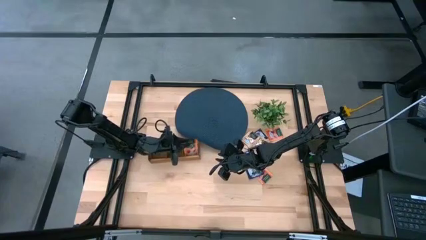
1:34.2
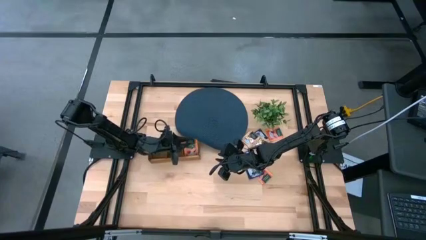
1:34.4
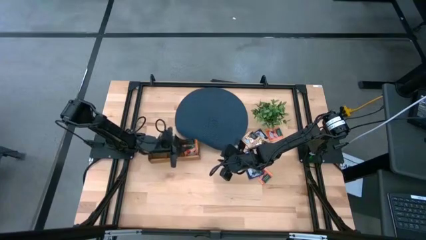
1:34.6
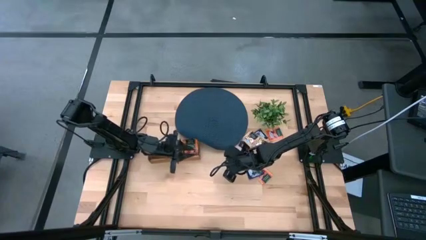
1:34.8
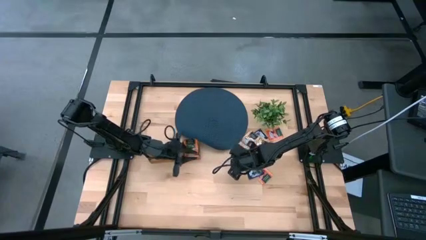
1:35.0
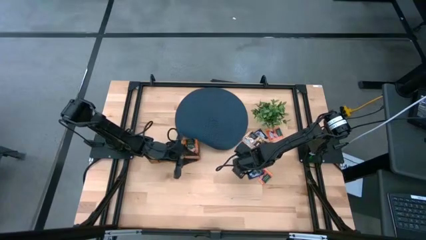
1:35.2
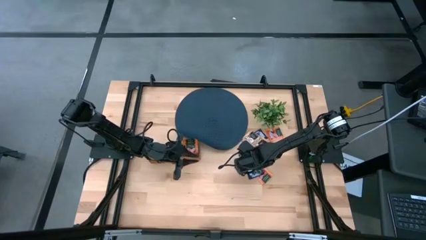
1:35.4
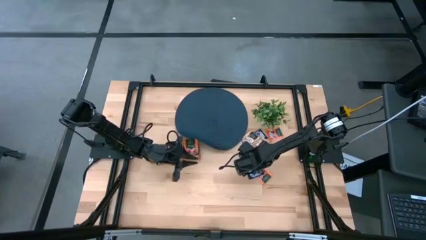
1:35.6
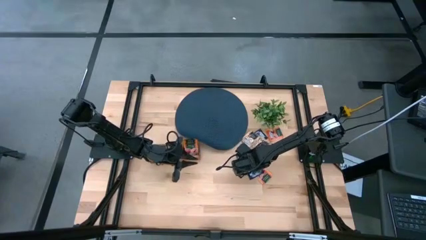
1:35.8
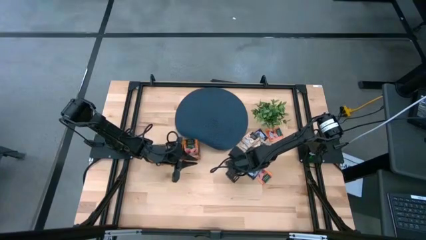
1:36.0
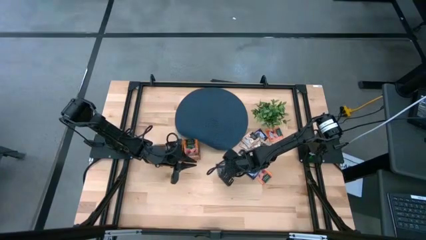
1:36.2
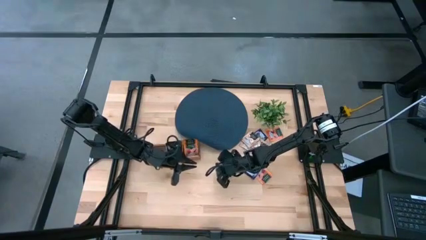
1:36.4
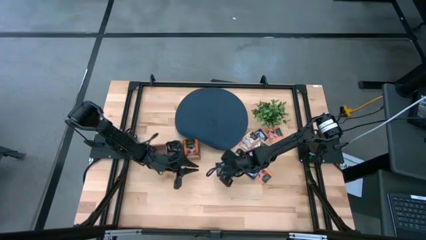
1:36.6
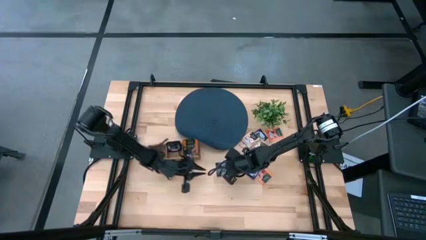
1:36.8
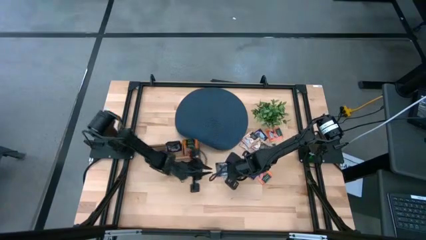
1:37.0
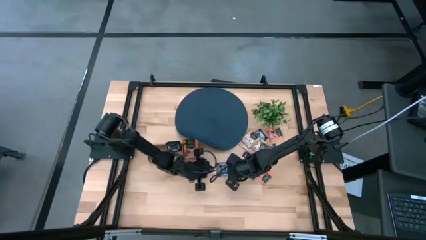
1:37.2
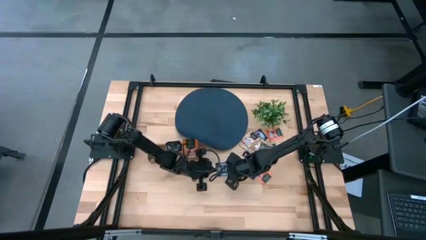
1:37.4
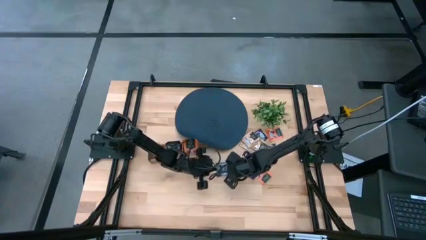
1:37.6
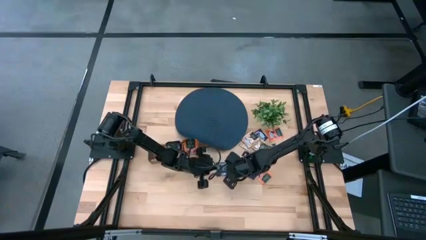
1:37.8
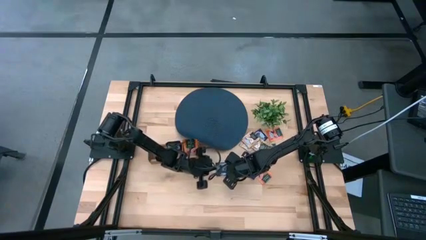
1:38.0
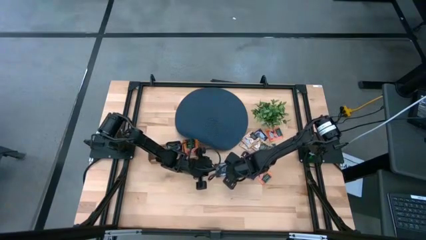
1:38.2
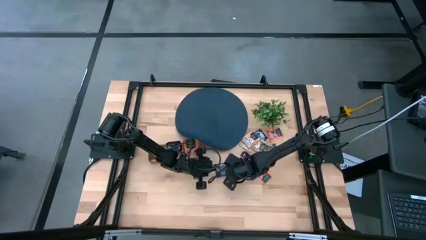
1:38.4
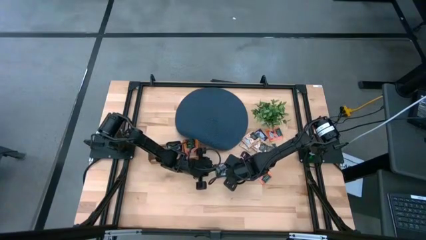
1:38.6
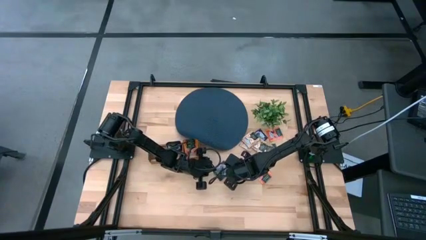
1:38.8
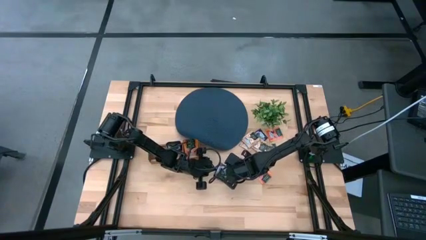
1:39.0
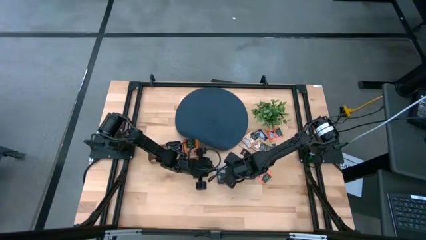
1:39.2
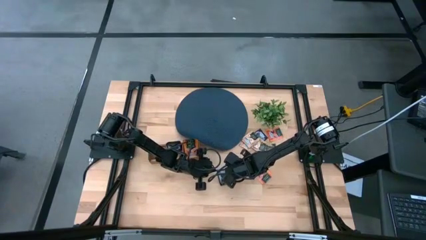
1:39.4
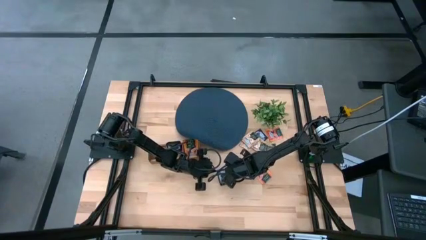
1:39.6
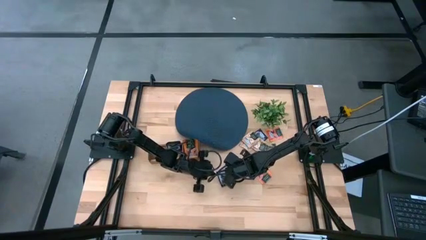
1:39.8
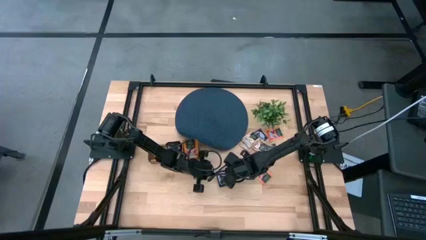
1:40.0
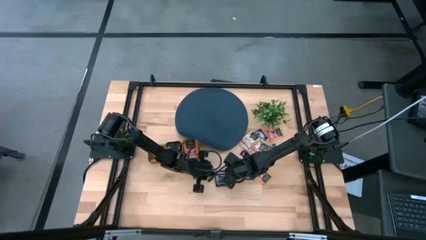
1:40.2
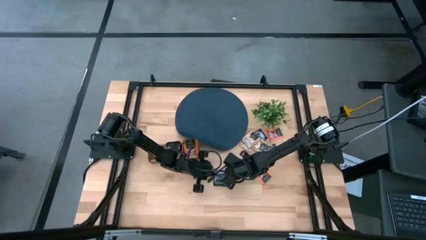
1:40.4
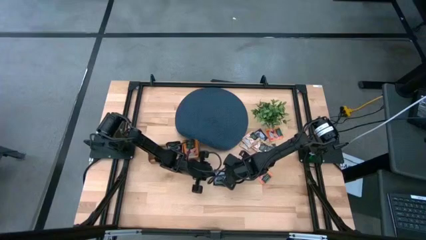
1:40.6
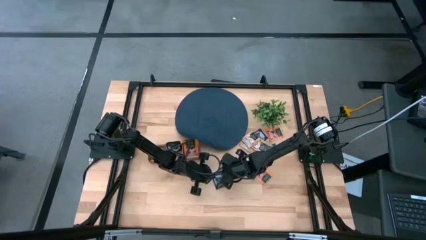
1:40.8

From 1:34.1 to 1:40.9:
Task: Pick & Place Tea
Put the blue tea bag into the middle section of the wooden organizer

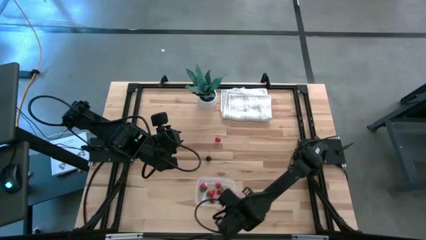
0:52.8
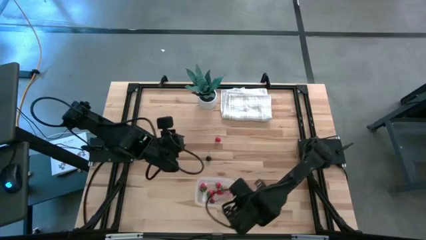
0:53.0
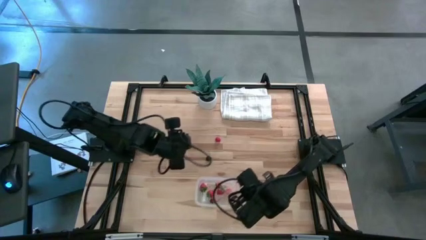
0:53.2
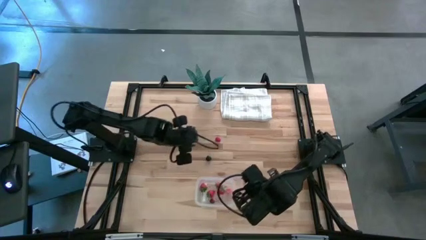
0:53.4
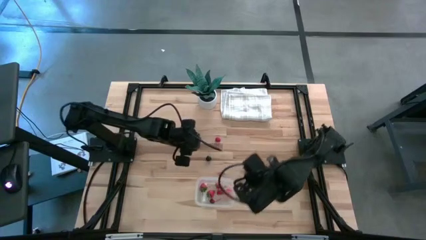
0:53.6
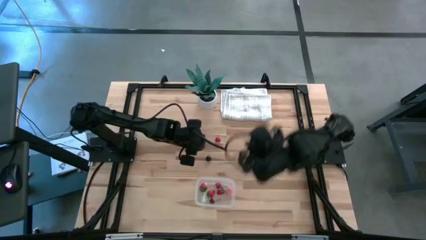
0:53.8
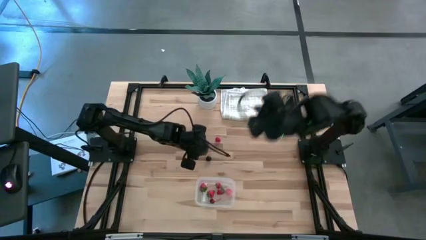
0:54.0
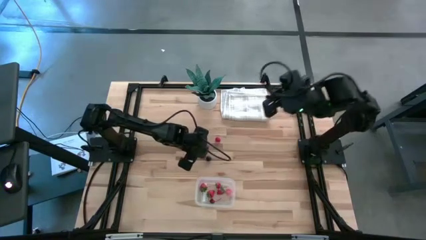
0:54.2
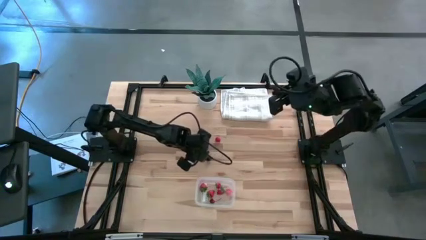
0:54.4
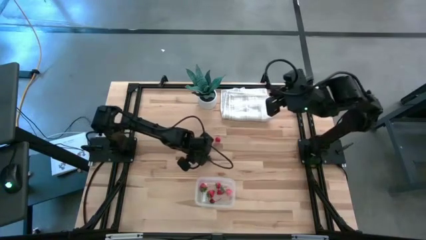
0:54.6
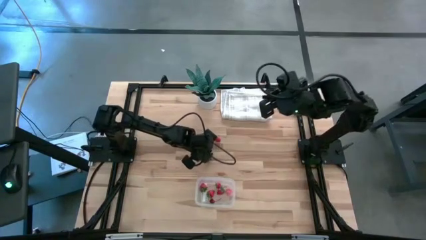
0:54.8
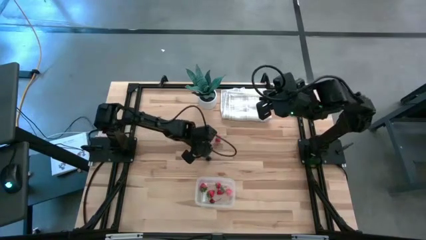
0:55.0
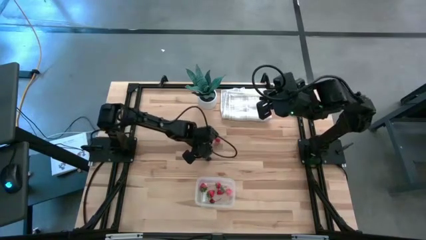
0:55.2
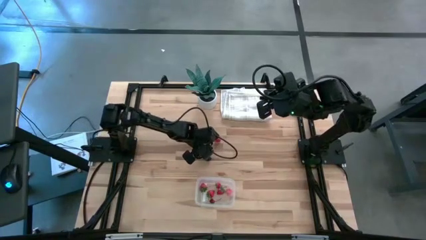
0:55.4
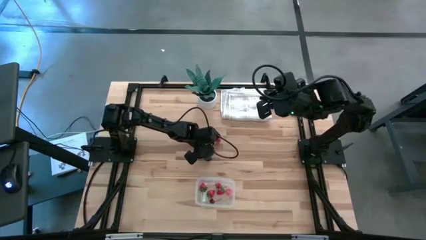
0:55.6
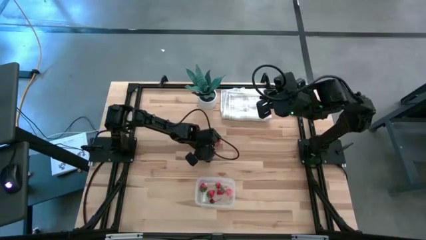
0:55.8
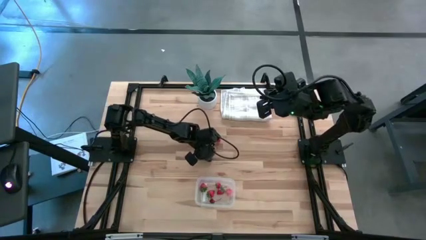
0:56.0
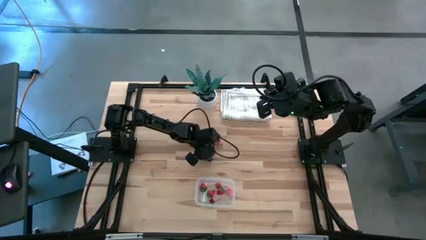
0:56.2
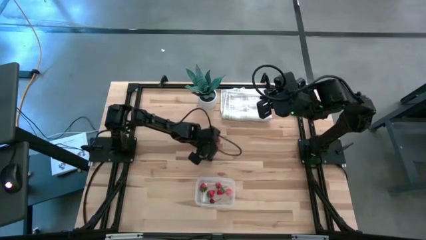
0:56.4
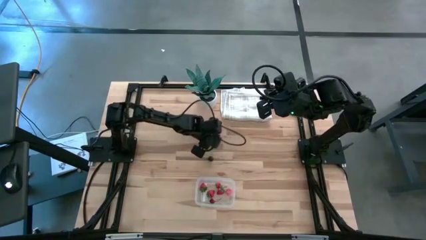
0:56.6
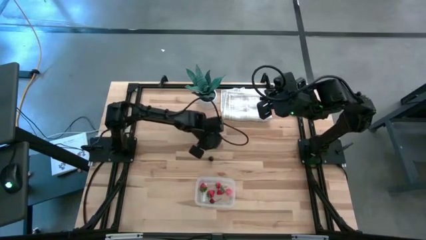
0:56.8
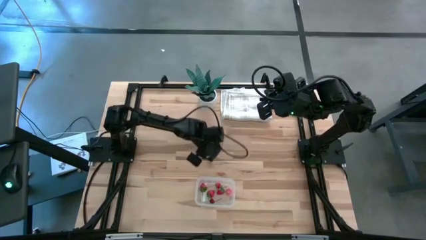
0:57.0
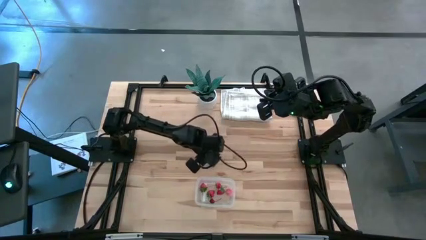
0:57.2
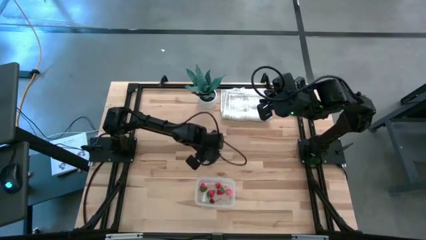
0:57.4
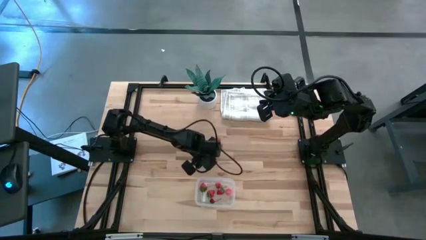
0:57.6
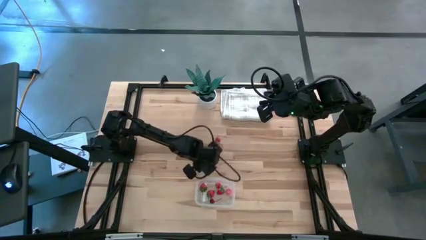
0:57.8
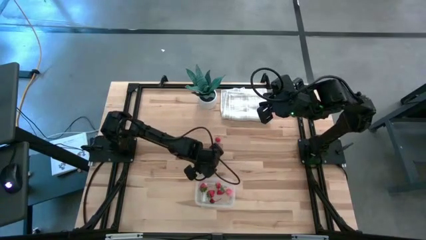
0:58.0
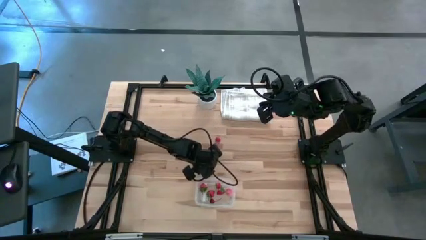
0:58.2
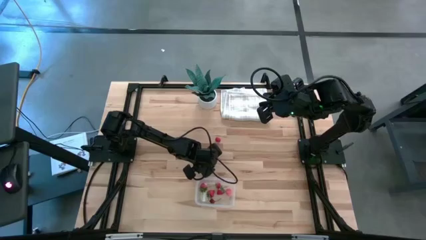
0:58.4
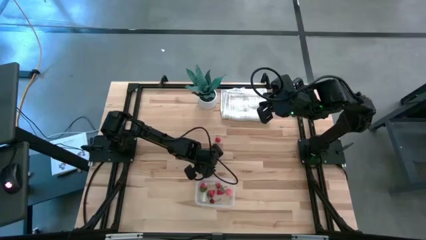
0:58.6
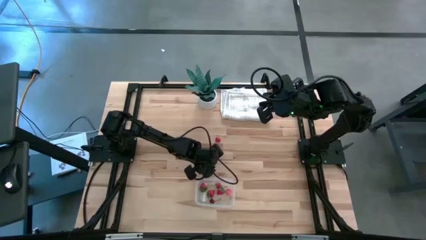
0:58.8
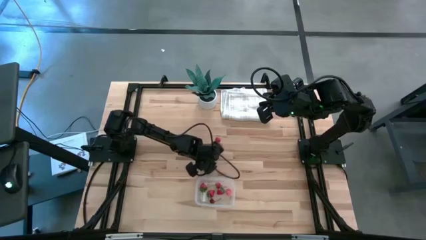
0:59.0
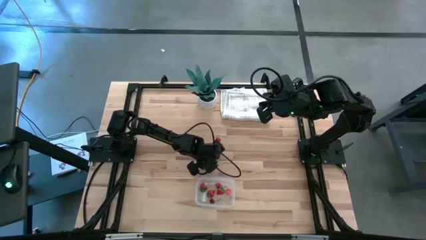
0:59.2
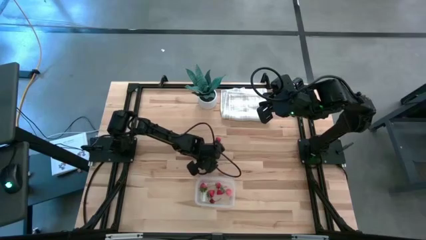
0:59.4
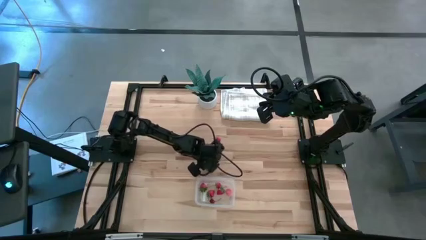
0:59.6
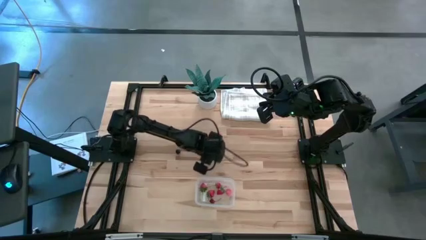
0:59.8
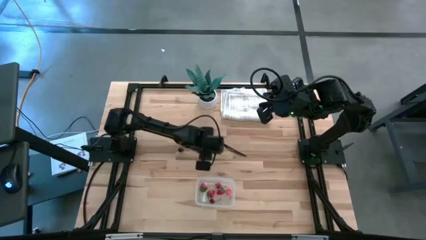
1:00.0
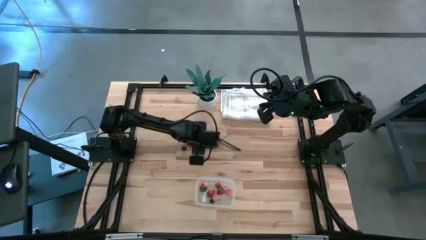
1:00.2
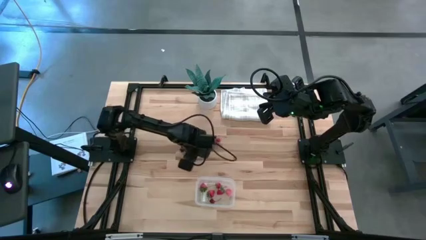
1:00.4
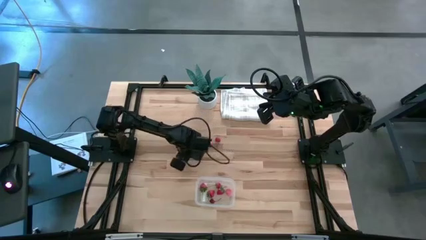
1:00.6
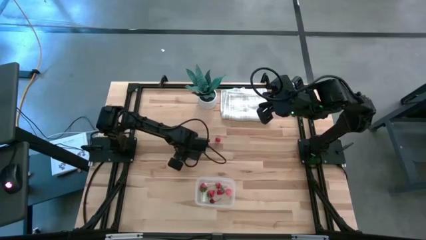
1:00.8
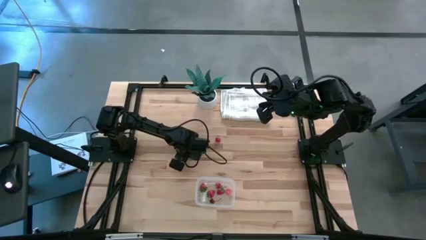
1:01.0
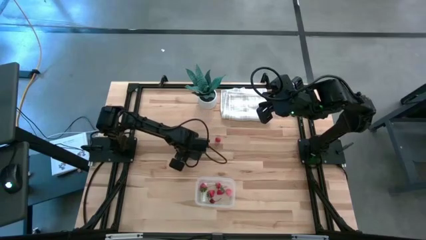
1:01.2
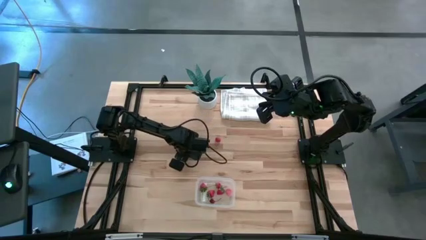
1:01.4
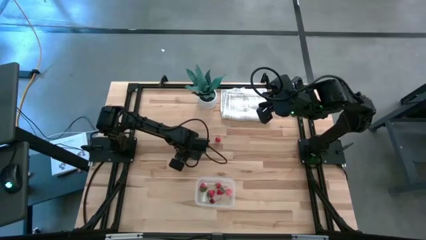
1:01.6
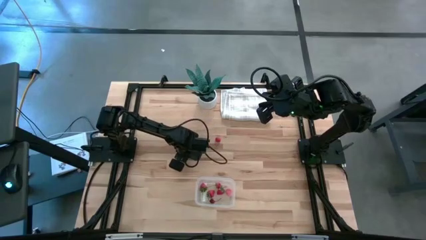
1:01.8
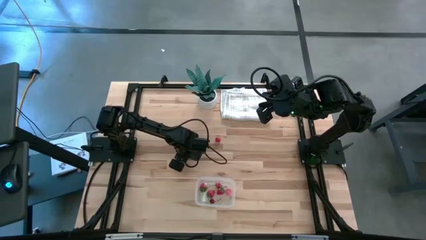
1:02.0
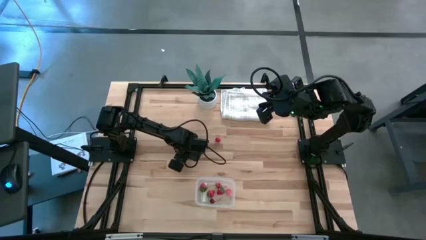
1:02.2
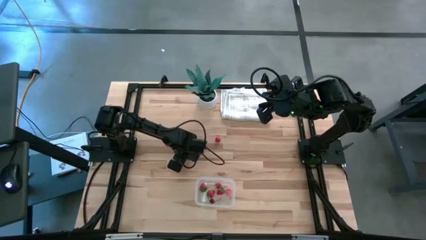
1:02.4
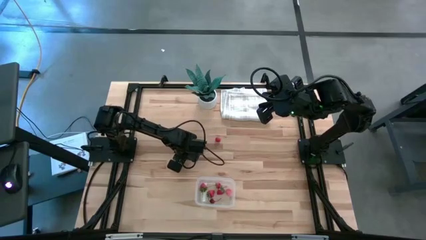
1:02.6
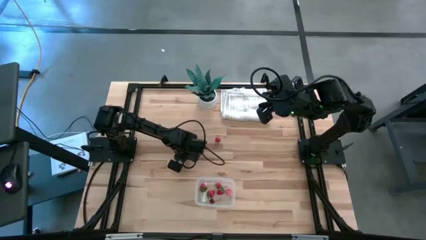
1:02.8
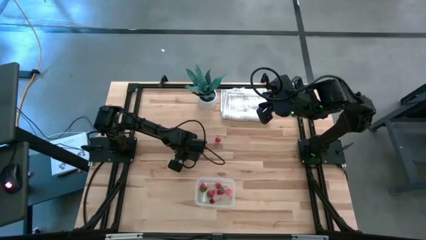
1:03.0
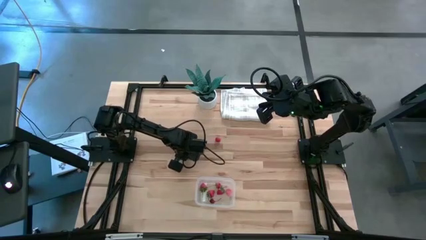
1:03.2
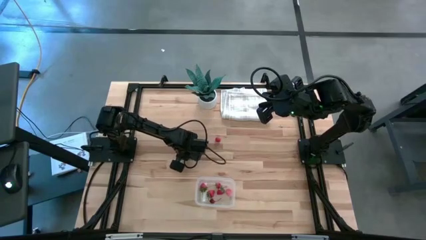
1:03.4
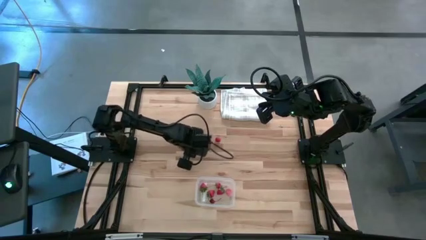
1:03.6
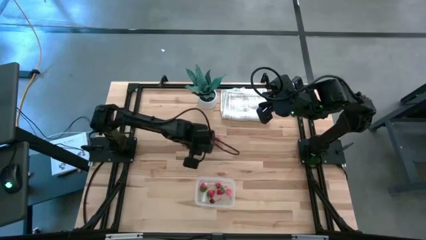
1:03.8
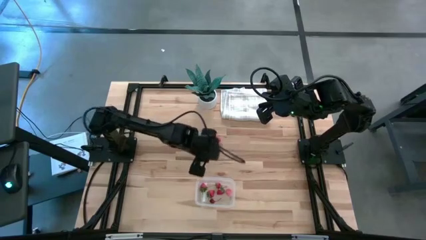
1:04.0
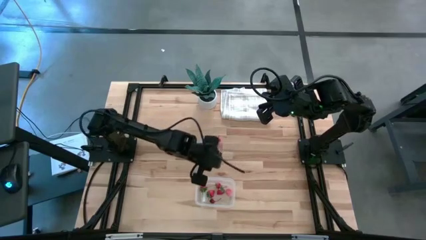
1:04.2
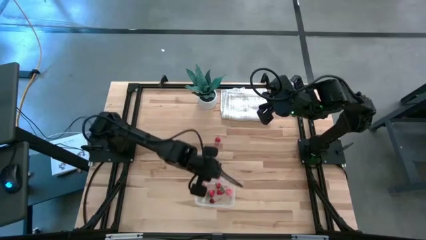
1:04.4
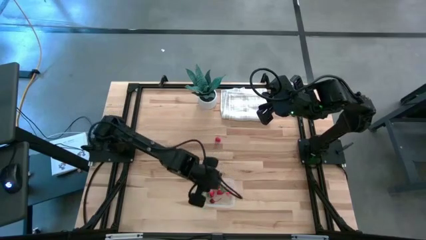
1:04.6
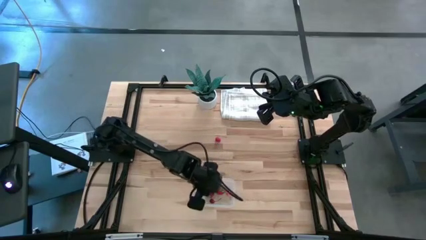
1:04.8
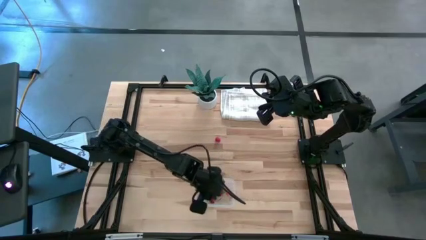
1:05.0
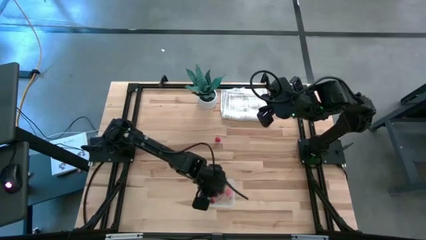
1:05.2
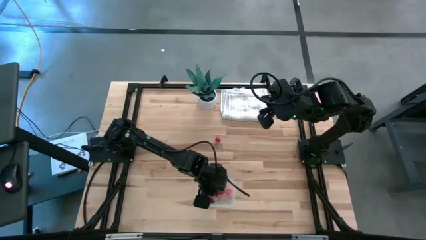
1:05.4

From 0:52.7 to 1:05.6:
Task: Pick and placing Produce into tupperware
Put the black cherry into the transparent bin
